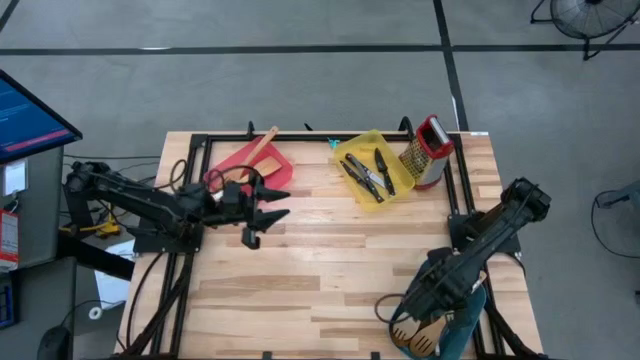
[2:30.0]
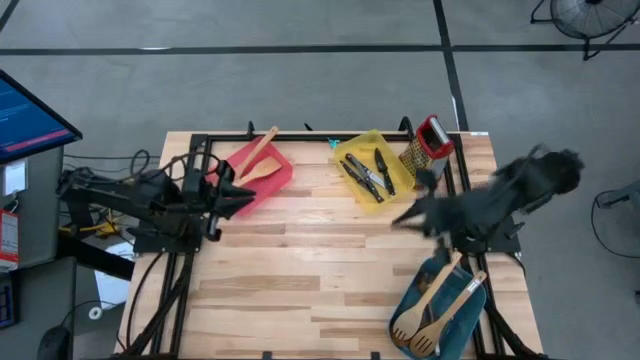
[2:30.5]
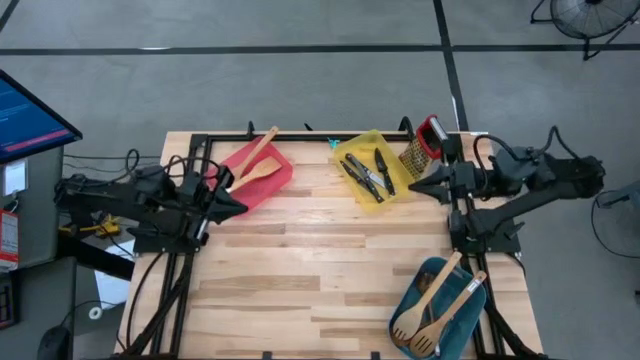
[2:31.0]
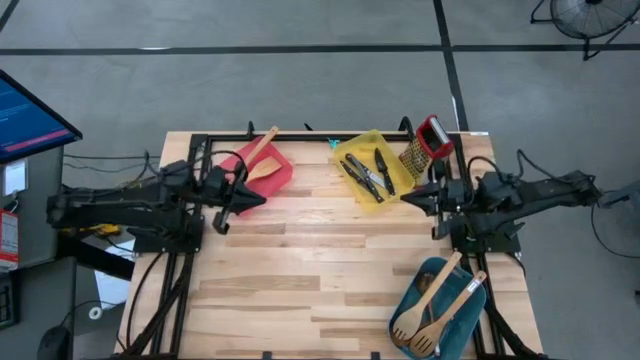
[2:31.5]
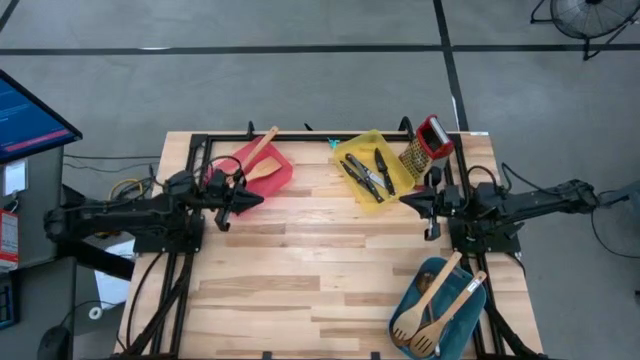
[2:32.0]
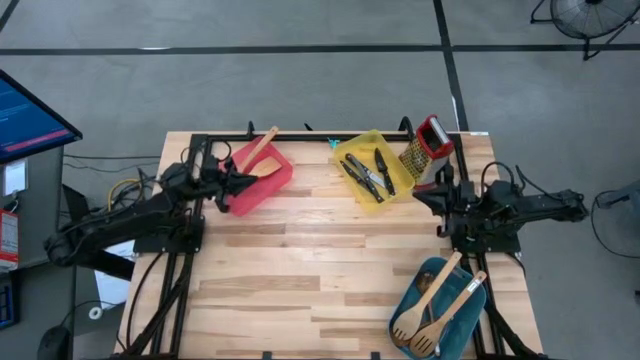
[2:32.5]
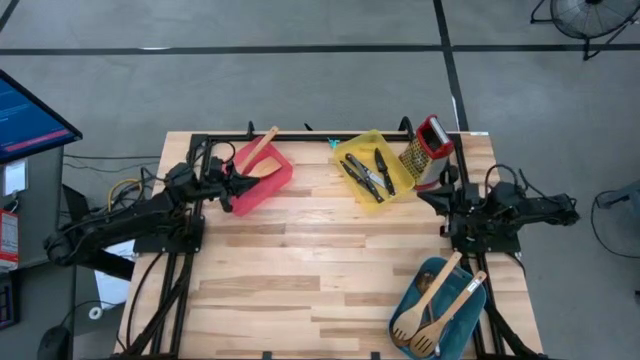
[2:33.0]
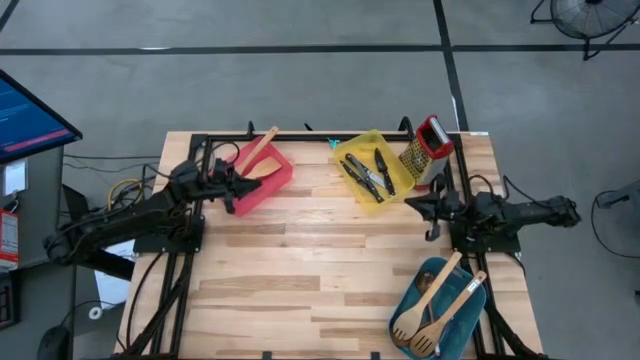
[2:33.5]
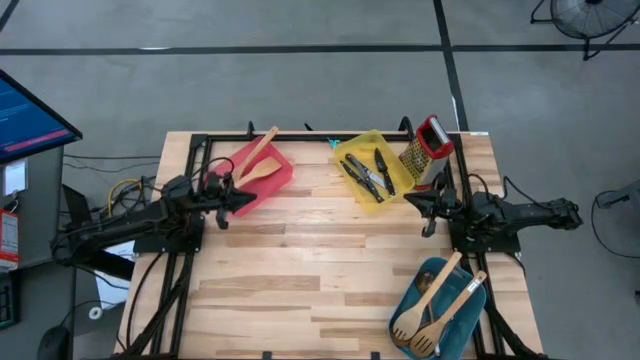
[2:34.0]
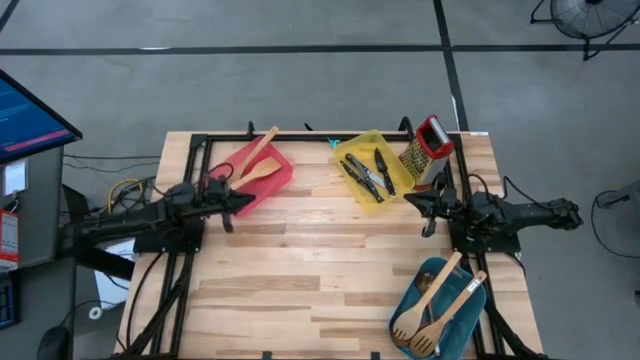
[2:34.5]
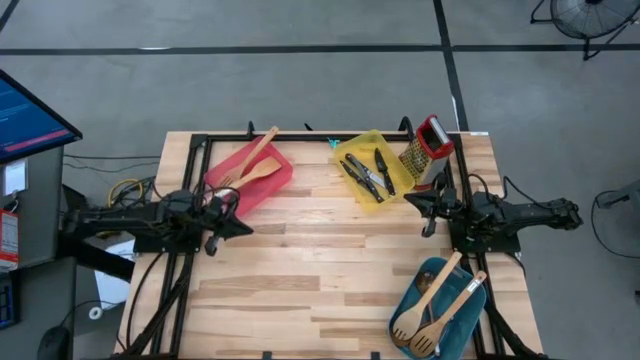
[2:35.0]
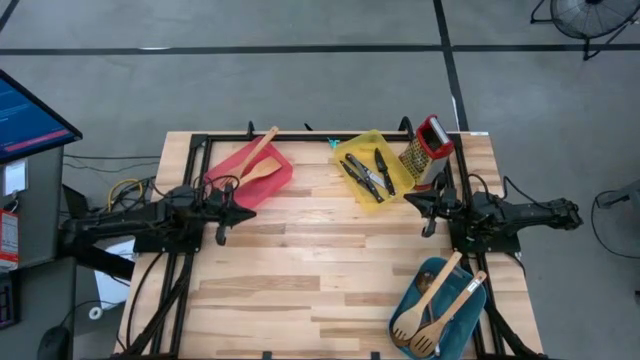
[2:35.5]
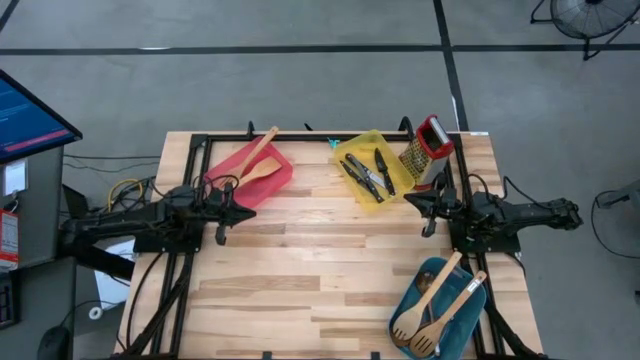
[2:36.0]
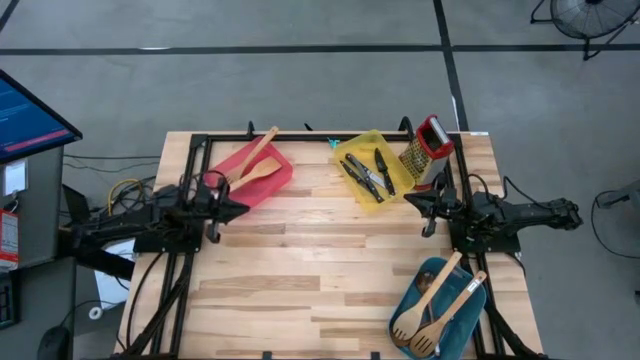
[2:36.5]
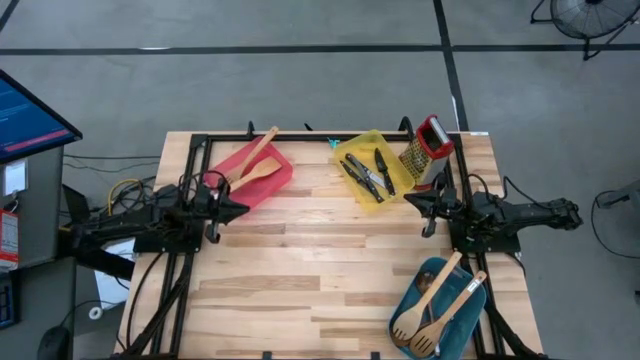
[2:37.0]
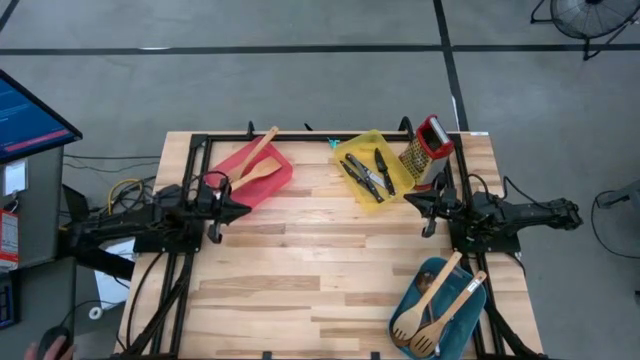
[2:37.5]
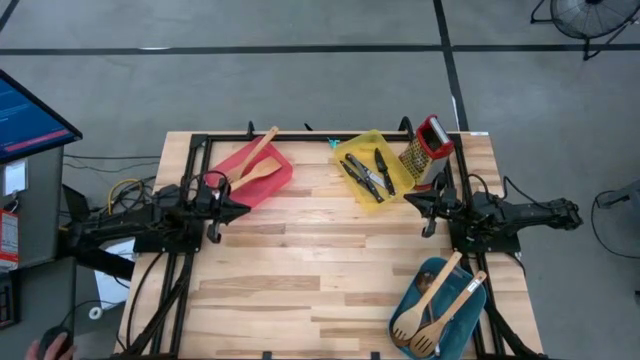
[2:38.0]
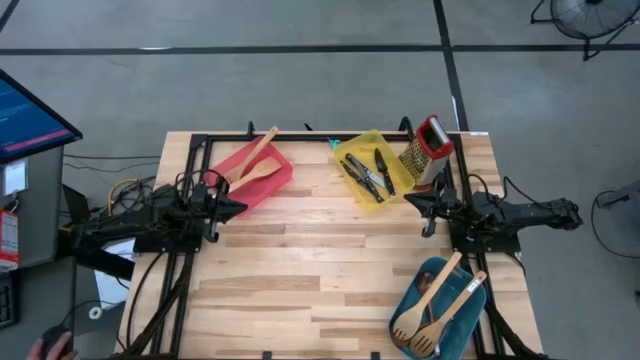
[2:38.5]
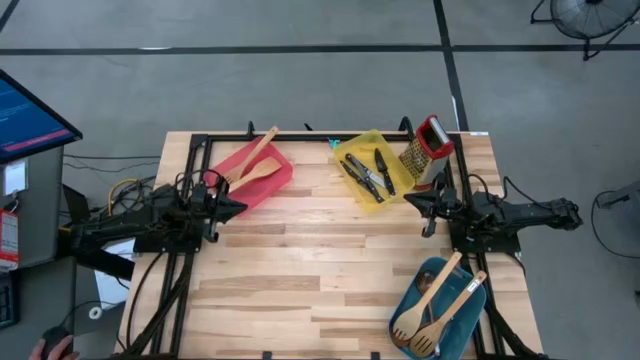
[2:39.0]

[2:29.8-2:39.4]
Task: Pick & Place Kitchen Items
Return to Home Position

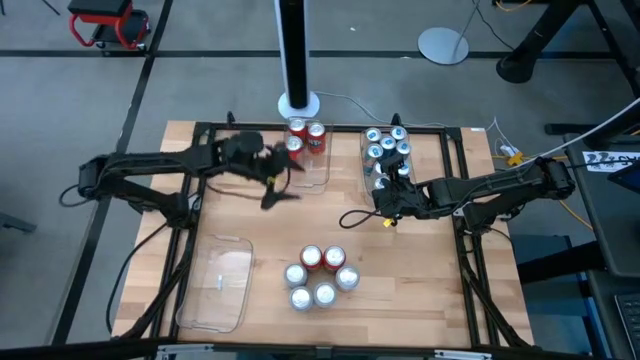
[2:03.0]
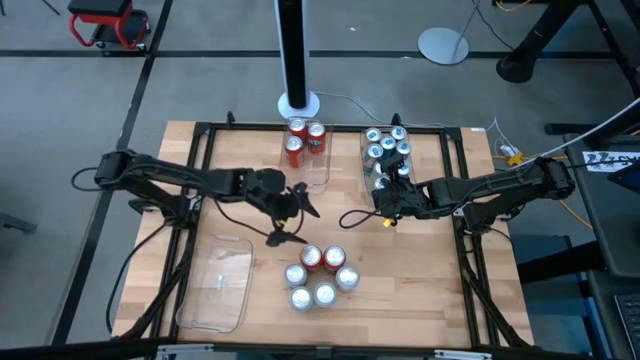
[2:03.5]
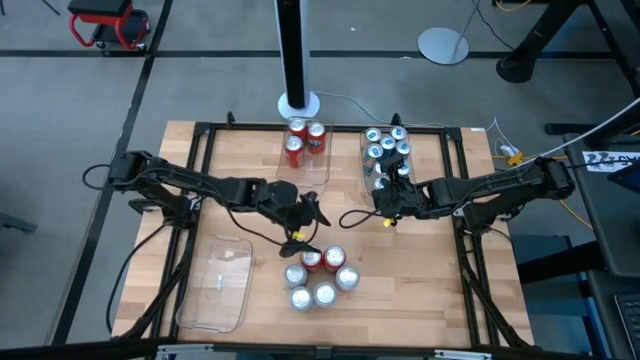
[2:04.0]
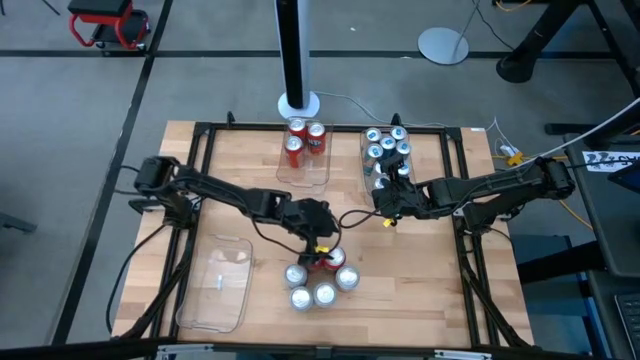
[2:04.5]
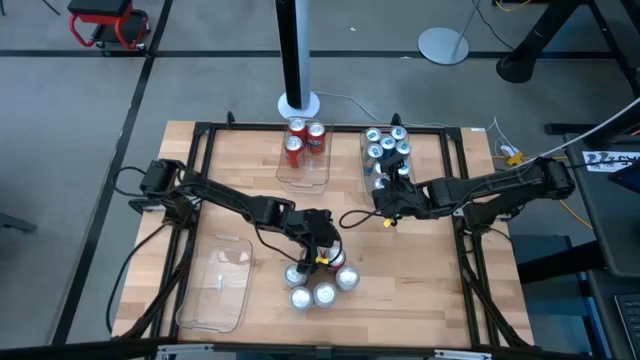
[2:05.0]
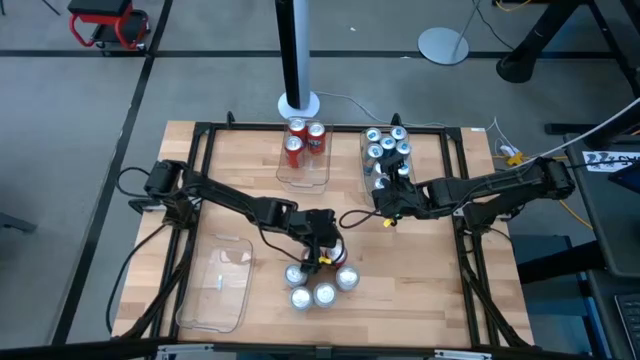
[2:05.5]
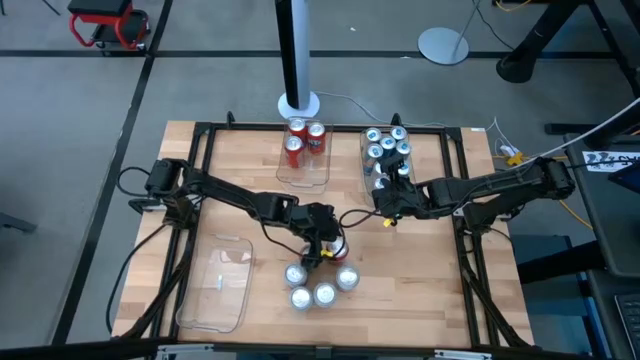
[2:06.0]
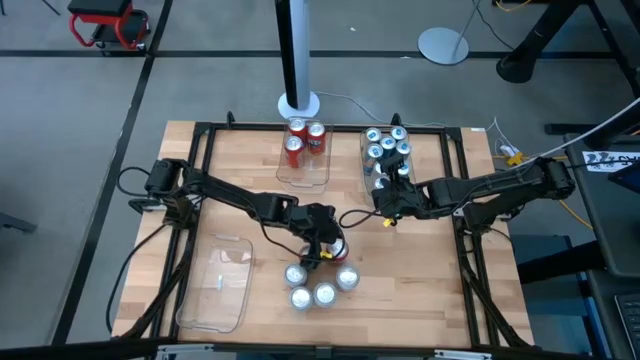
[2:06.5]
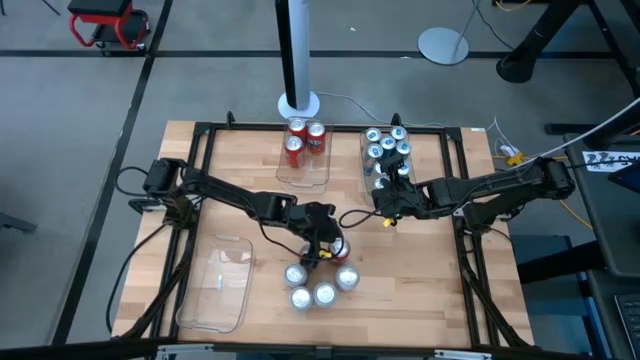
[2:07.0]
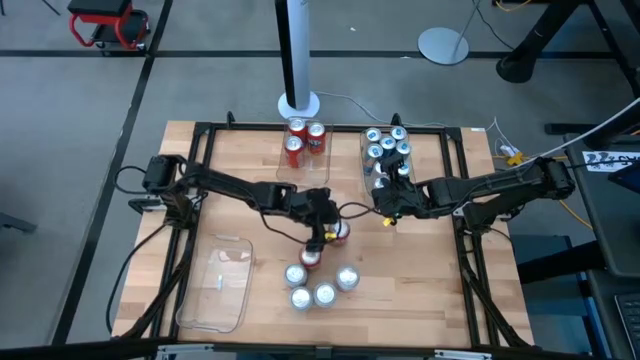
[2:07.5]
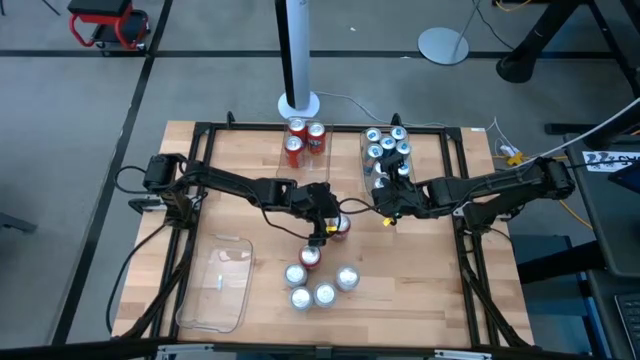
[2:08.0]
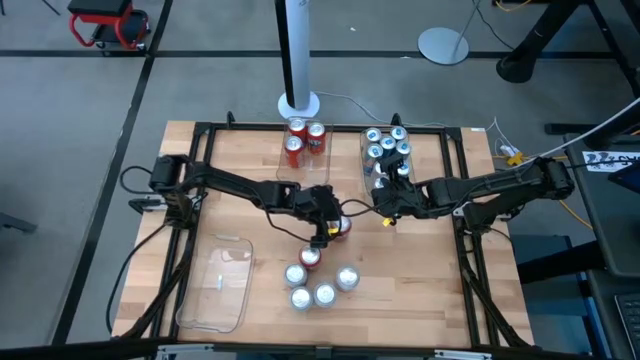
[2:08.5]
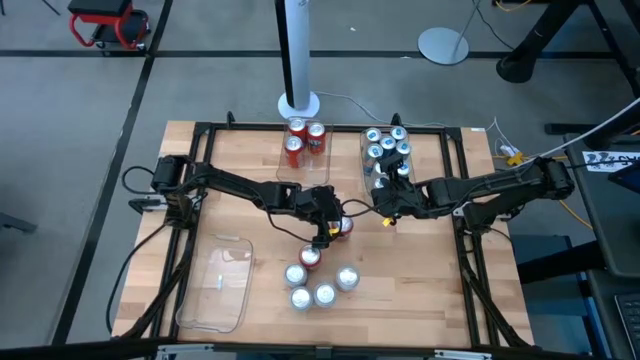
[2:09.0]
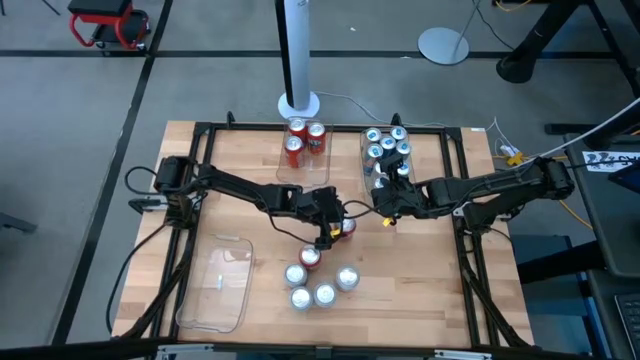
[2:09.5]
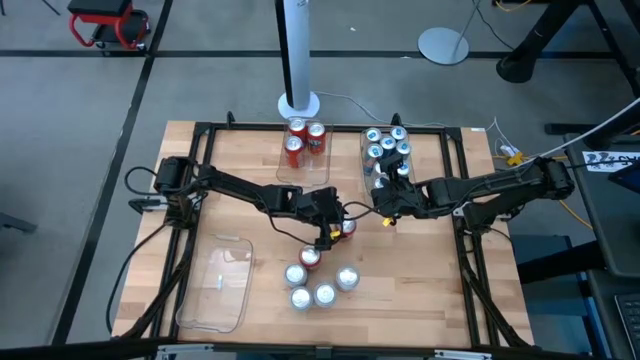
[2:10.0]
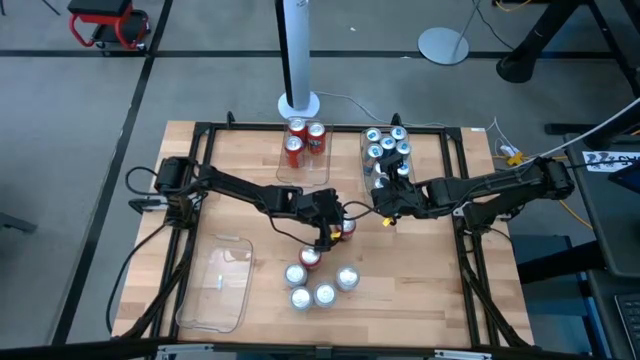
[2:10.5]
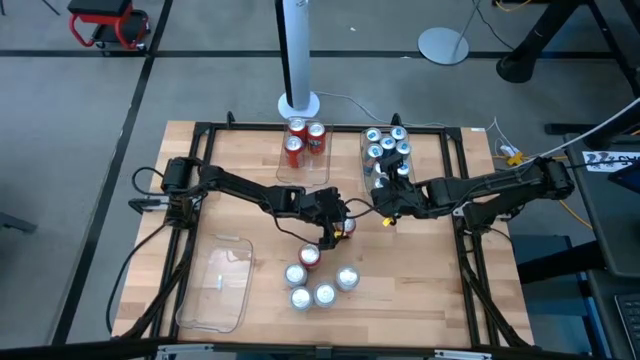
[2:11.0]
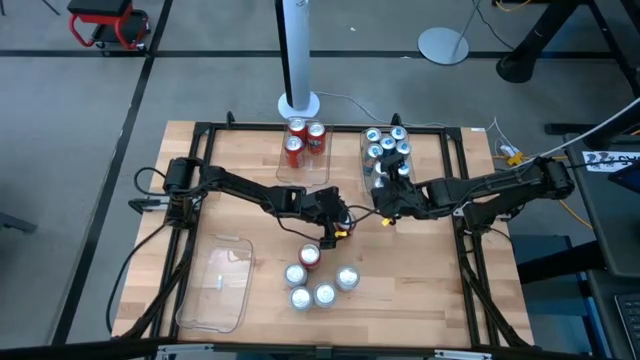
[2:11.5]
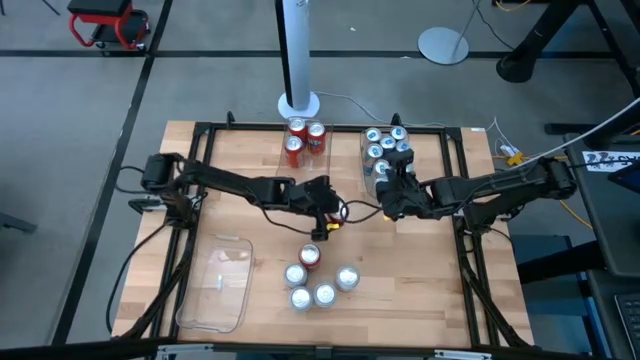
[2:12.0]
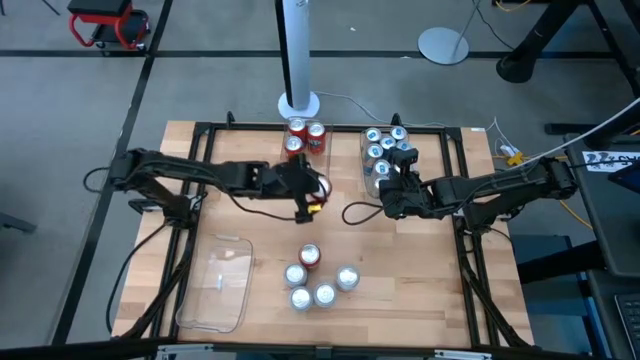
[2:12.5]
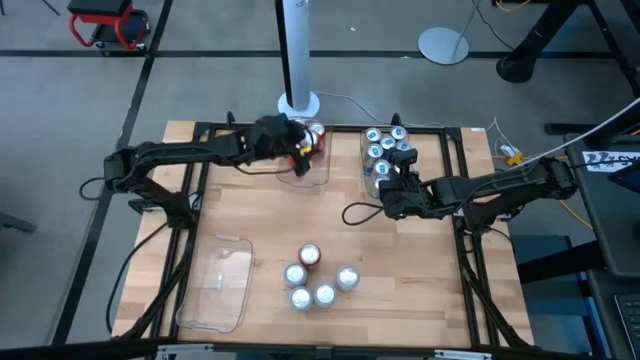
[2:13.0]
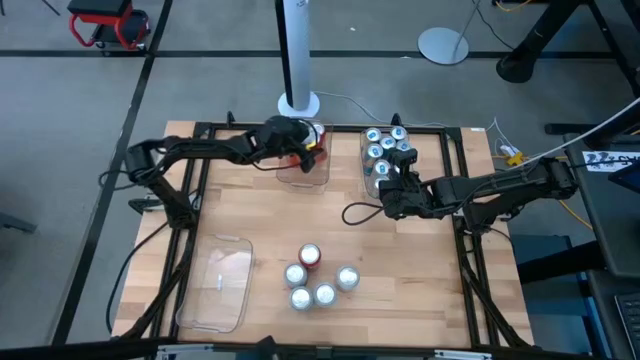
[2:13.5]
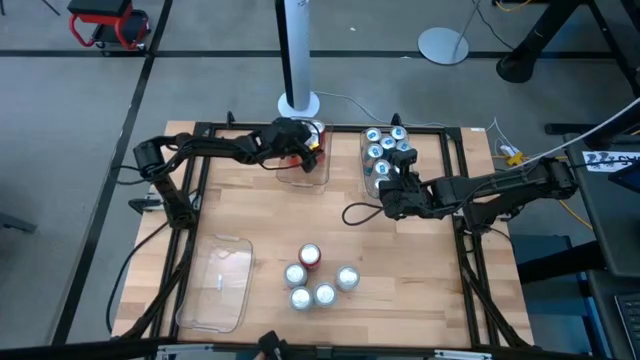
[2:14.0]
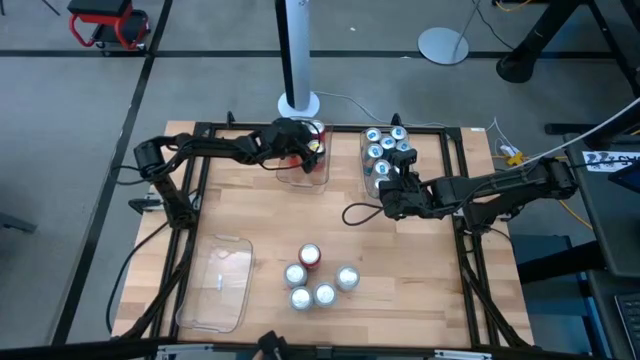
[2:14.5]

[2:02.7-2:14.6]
Task: Sort soda cans
Put the red soda can into the top center transparent bin
